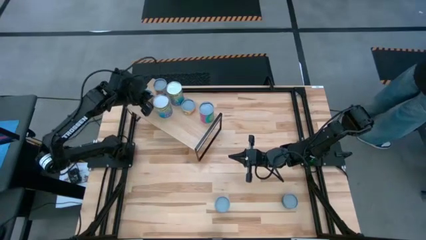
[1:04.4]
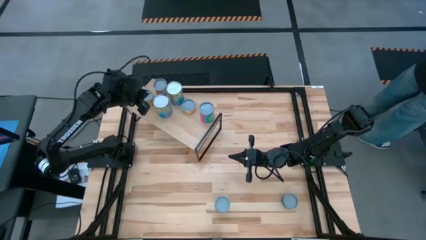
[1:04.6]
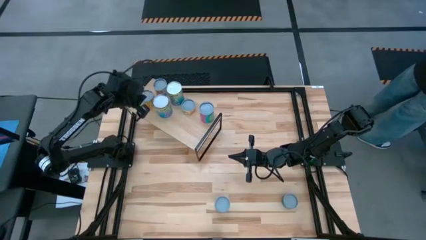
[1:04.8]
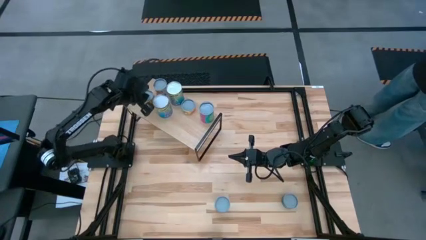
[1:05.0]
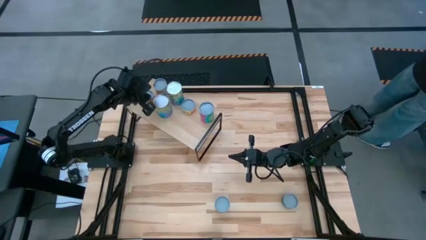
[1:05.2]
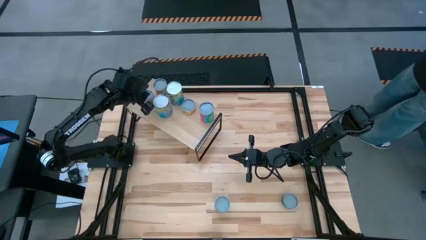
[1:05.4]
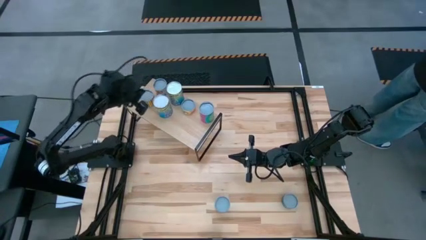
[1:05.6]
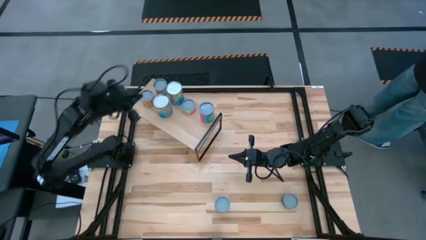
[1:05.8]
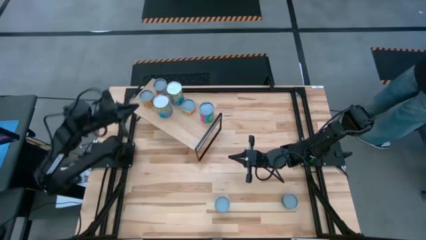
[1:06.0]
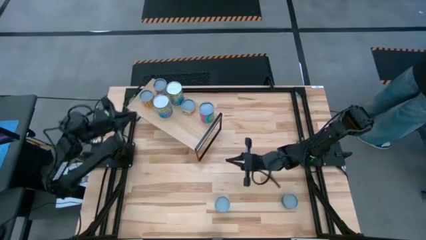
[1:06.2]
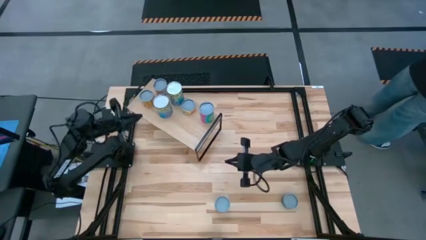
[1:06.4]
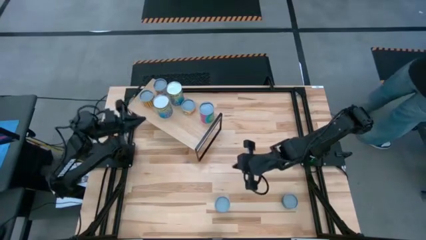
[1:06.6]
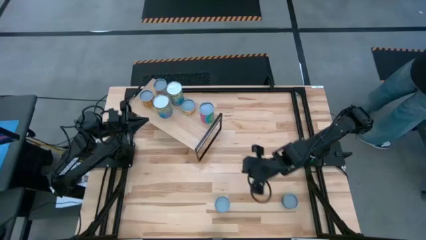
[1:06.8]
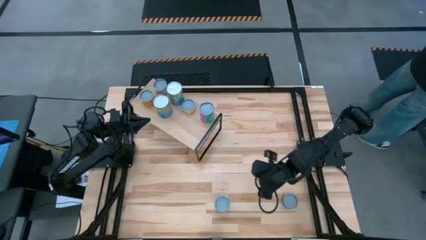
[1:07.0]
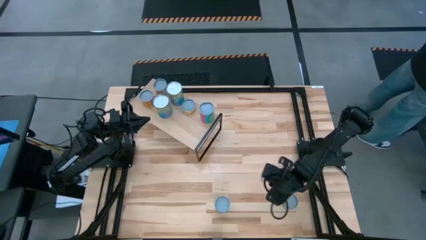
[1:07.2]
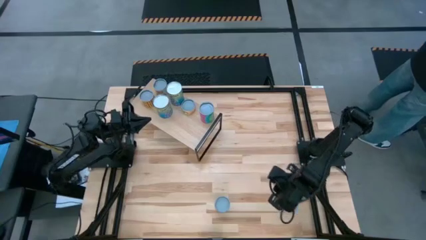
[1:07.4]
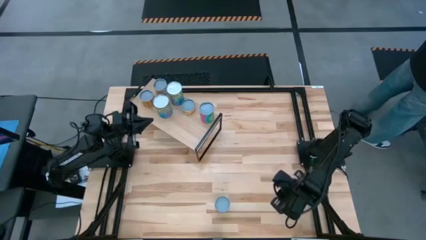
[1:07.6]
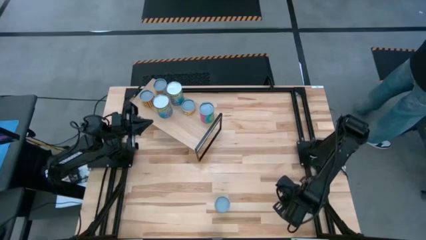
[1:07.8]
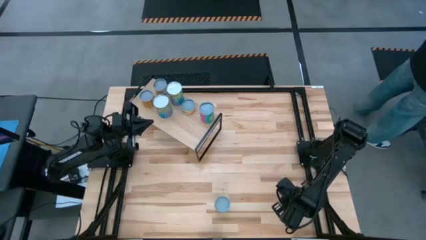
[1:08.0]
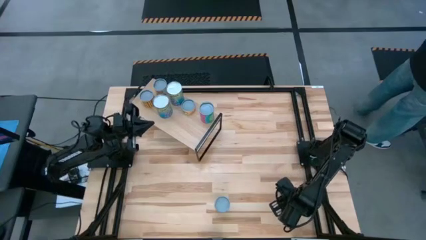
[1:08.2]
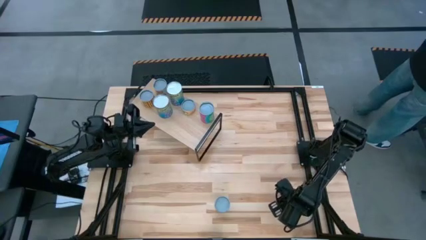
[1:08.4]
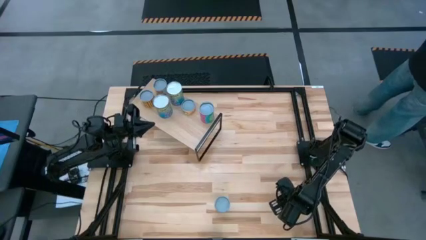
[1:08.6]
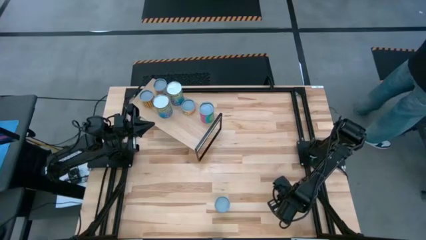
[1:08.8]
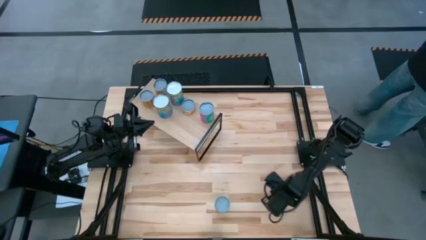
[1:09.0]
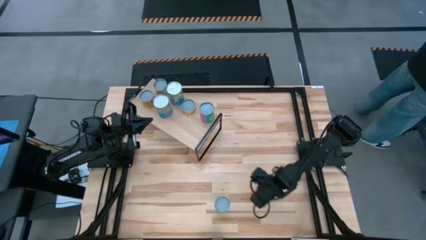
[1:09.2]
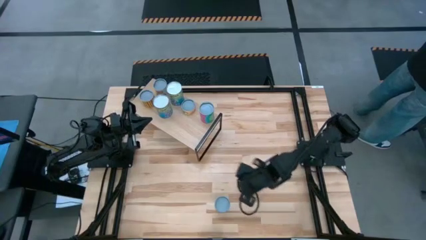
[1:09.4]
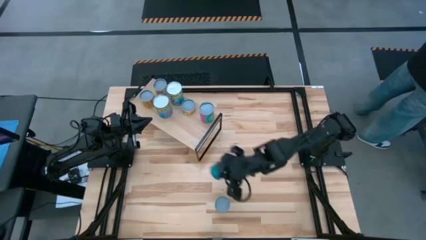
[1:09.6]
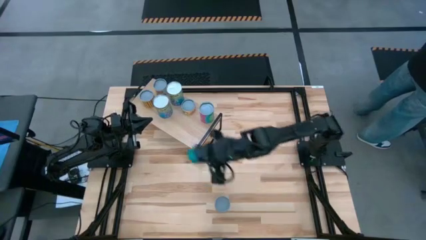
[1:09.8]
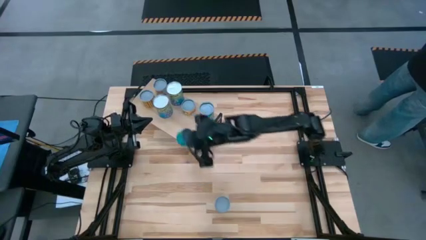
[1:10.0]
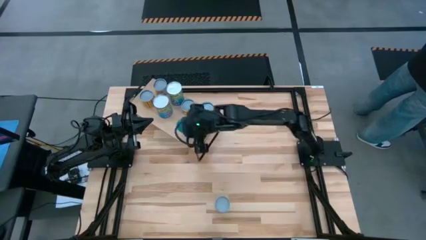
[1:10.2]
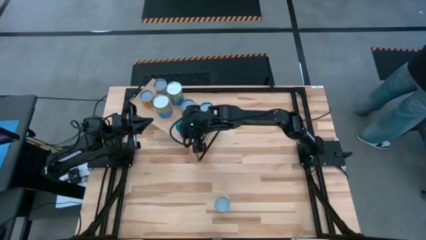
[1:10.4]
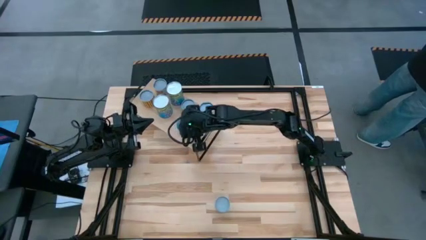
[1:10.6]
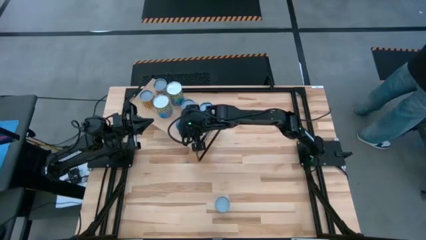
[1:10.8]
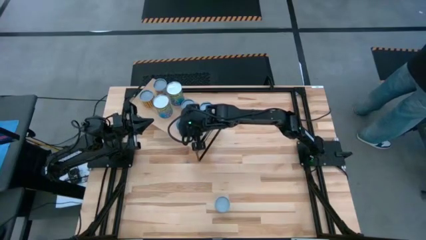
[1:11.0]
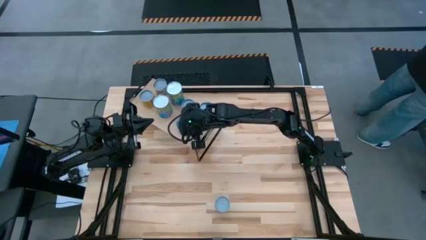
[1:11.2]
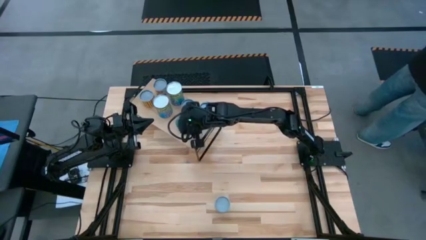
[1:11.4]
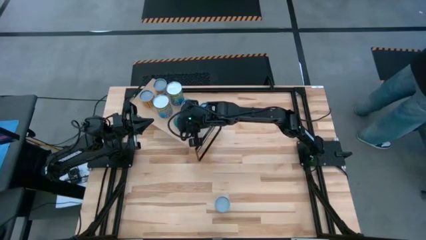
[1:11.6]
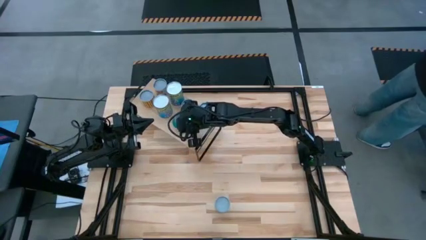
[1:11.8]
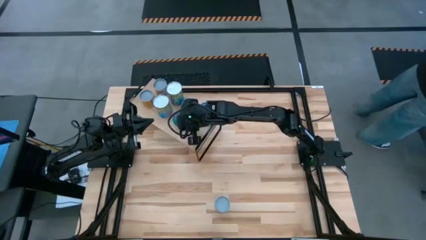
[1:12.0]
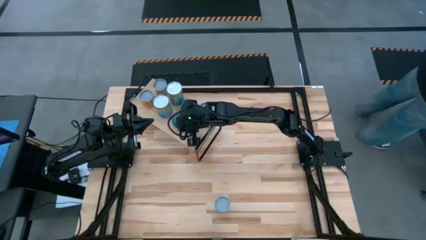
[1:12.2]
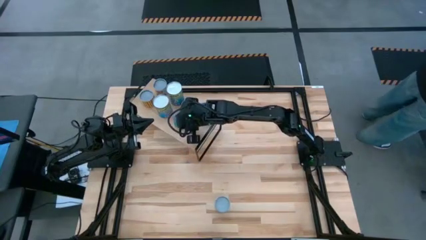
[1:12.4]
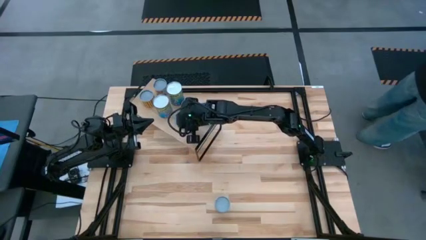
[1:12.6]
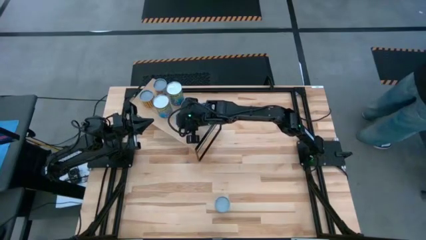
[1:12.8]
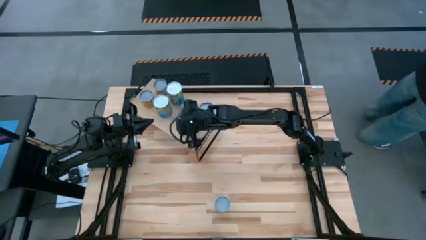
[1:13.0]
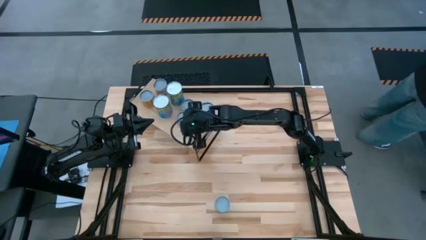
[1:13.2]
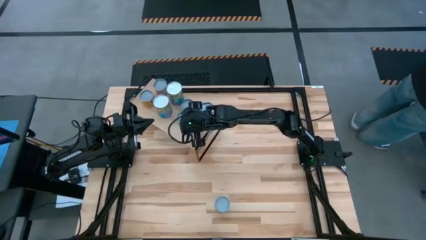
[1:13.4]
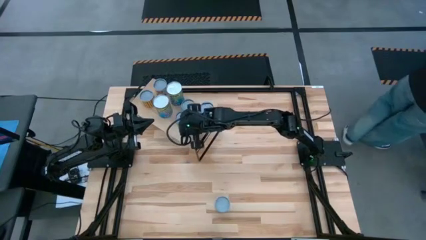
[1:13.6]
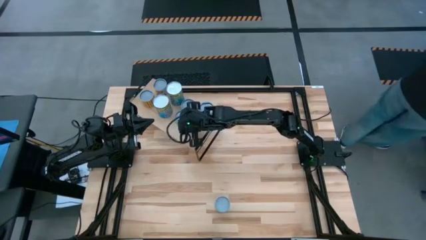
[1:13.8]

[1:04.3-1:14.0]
Task: Pick and place cans onto a shelf
Put the canned tuna on the shelf

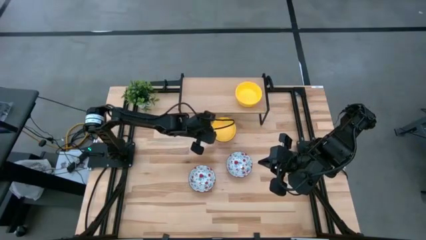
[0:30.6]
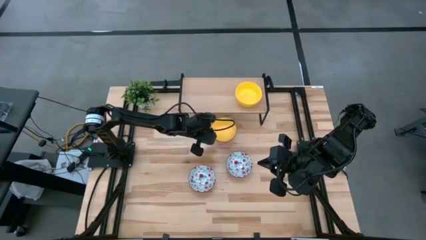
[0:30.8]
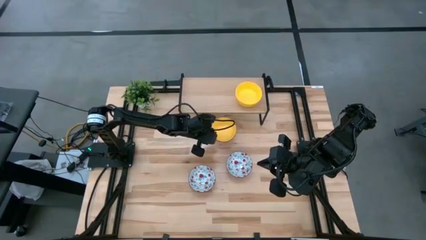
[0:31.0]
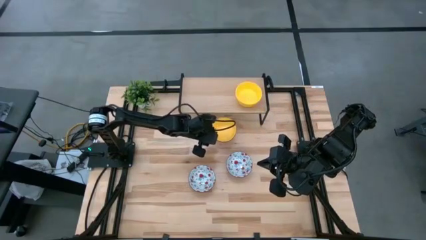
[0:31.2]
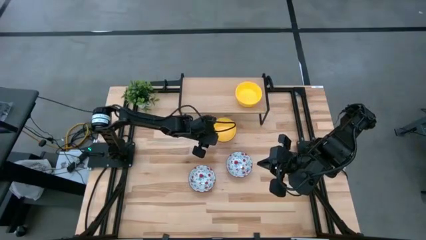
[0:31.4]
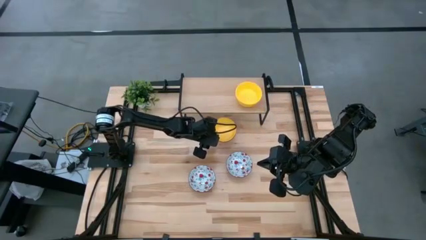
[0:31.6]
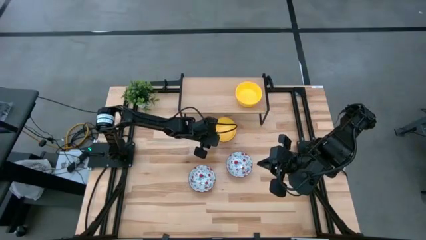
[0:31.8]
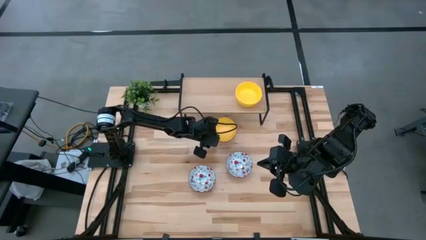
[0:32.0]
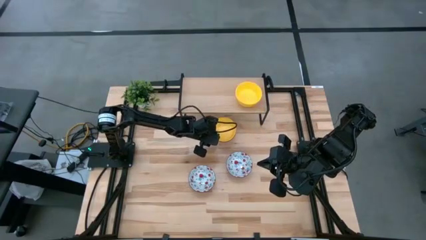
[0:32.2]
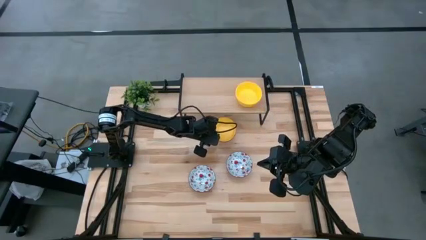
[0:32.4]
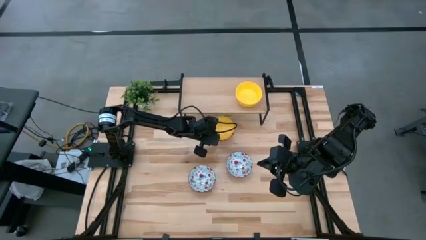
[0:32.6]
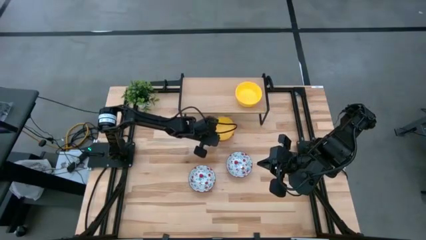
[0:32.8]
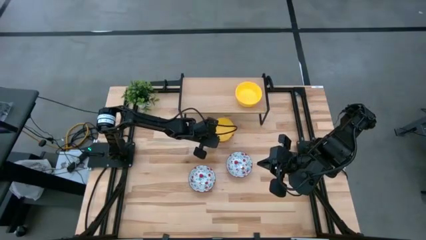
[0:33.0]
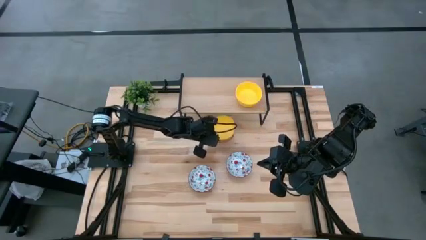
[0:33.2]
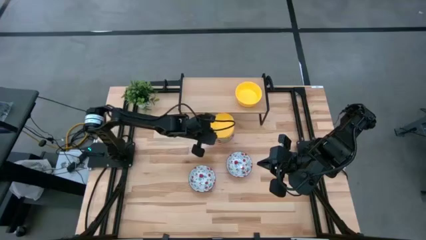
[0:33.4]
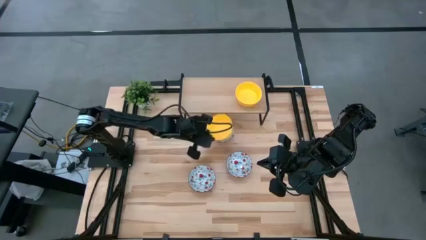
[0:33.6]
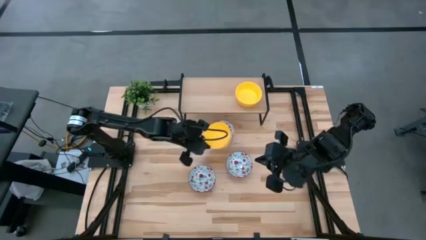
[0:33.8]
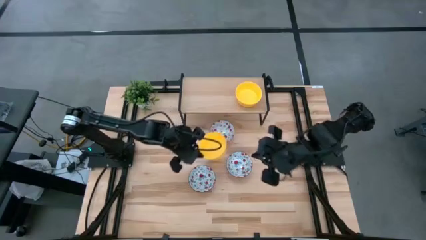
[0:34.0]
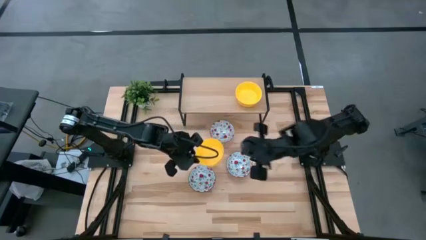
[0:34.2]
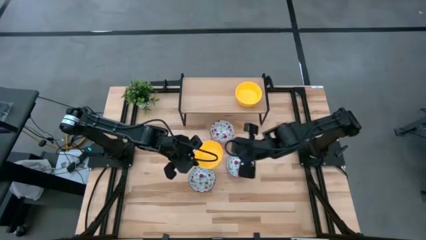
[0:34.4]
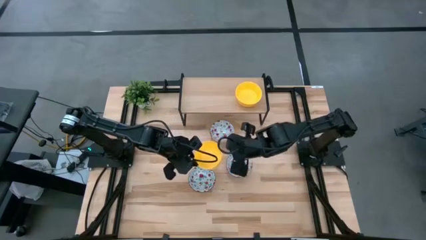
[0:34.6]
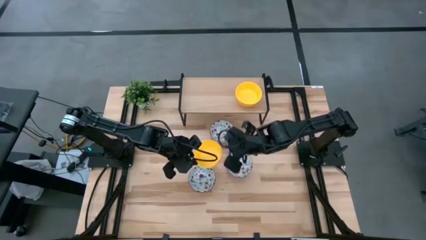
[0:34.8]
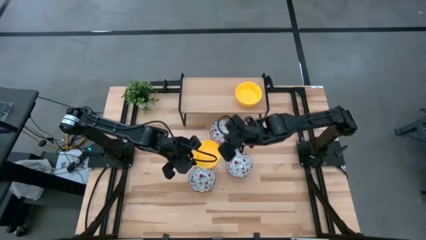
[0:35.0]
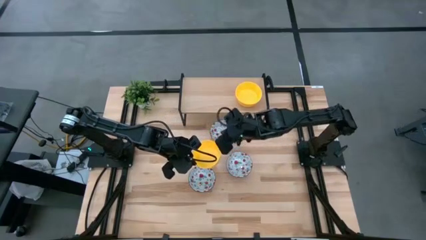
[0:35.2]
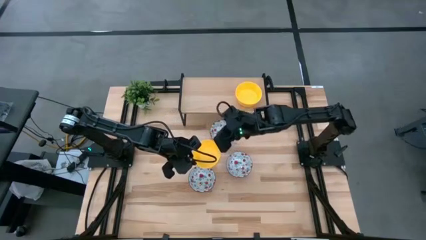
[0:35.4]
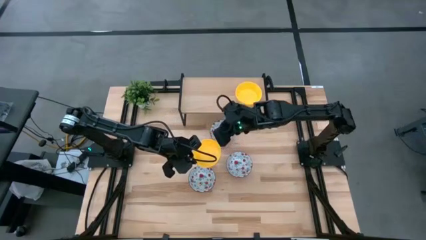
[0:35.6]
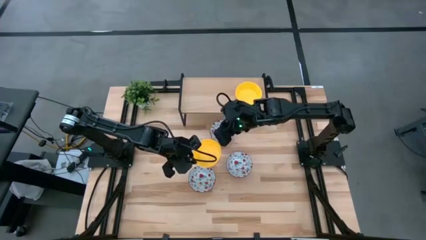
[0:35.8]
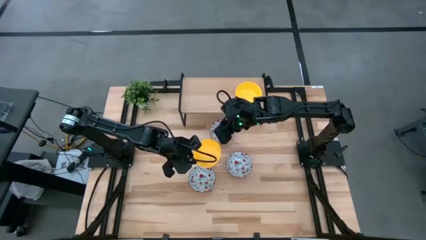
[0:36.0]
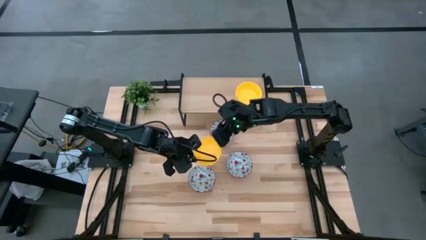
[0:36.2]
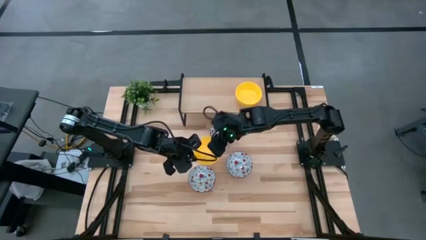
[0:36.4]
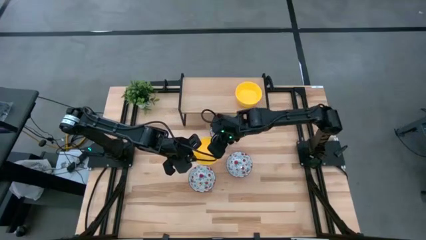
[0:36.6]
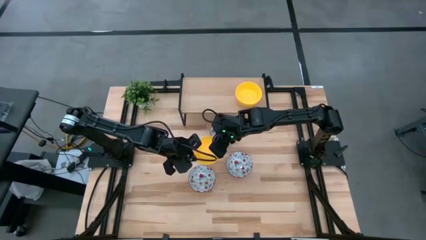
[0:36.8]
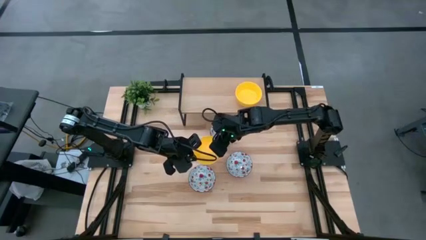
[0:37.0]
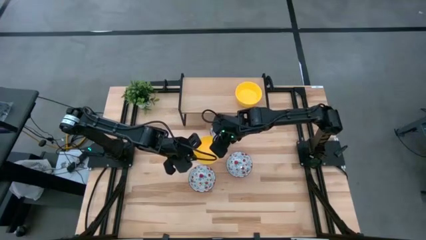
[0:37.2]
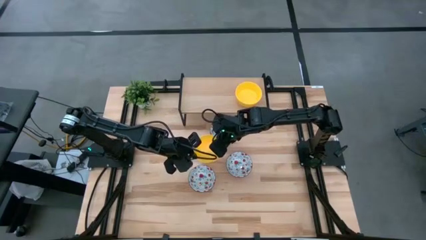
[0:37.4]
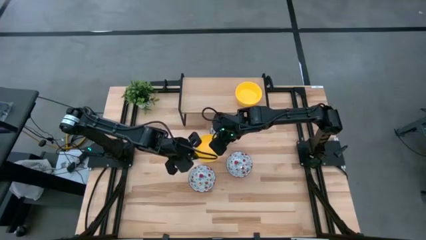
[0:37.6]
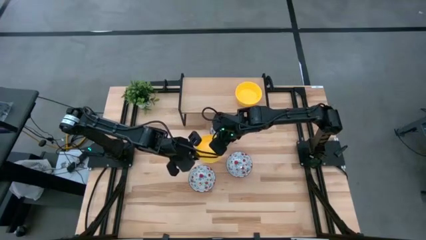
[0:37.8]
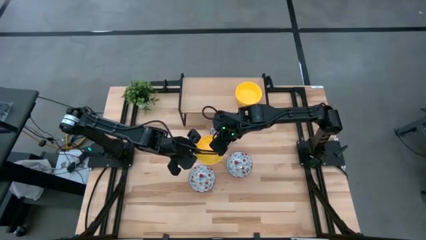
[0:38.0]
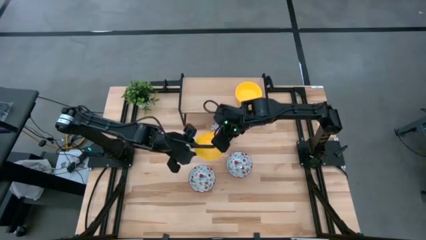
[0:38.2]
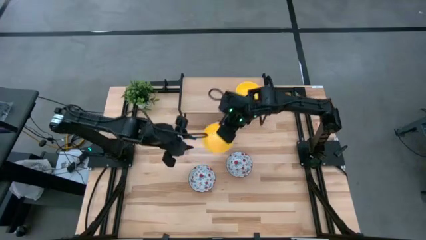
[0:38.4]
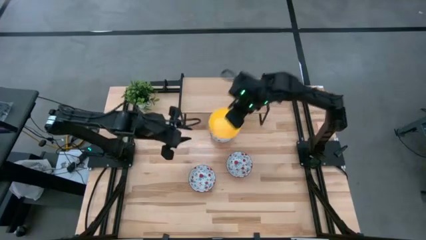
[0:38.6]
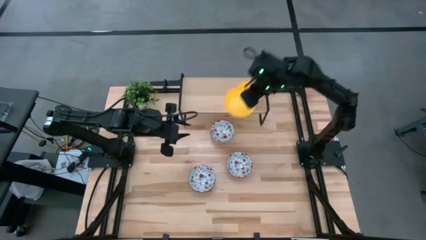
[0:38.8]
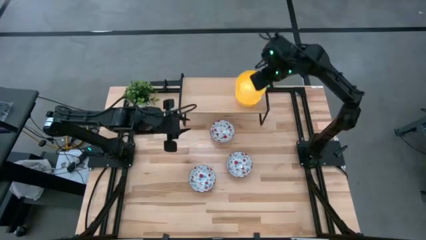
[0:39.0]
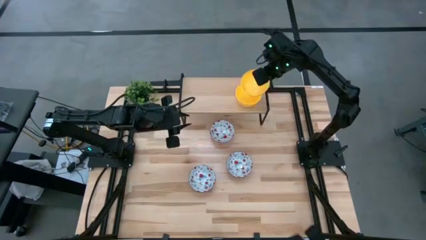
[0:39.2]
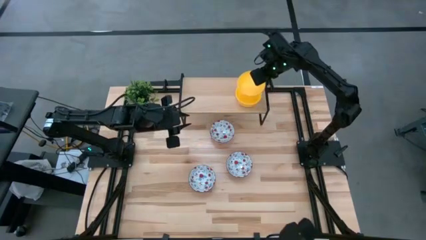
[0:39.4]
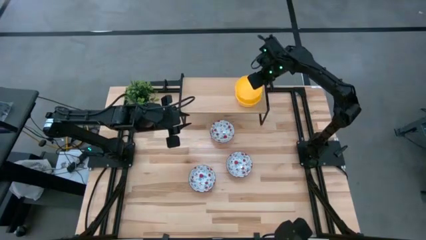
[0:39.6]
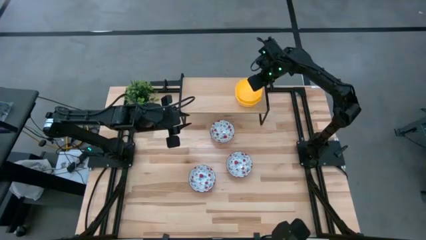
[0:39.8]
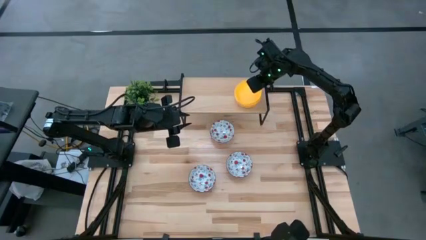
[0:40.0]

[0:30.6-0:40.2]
Task: Pick & Place Mini bowls
Stack the yellow bowl on the yellow bowl on the shelf
